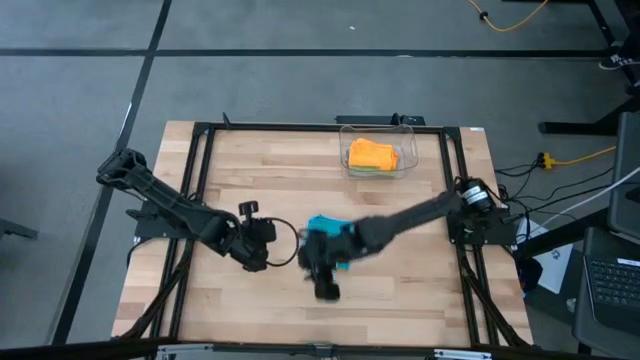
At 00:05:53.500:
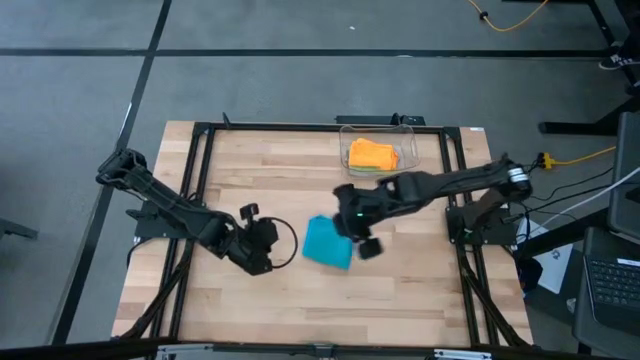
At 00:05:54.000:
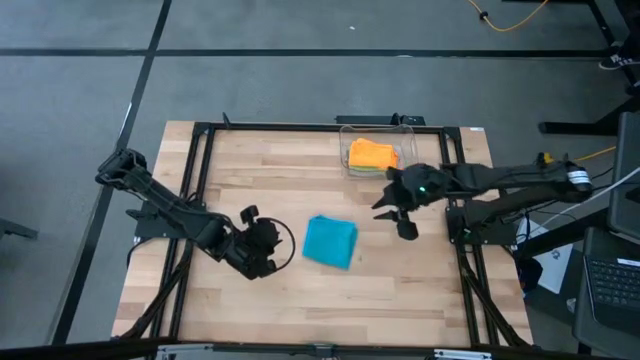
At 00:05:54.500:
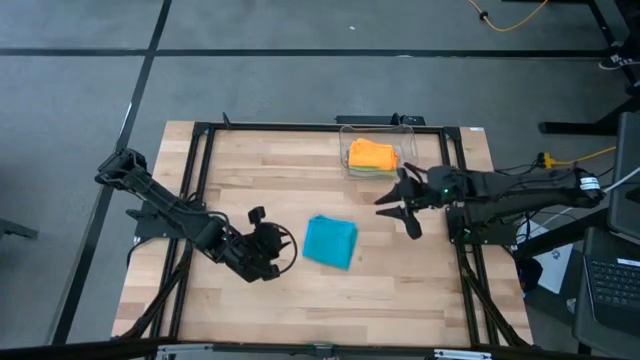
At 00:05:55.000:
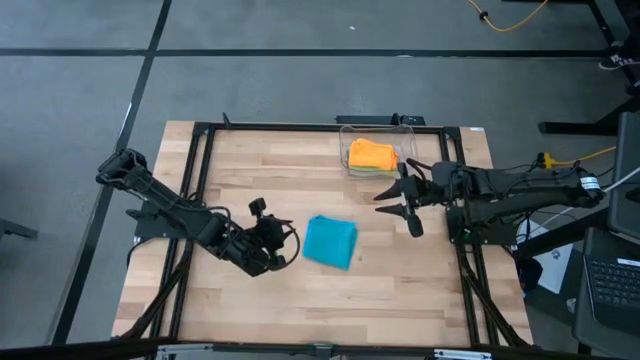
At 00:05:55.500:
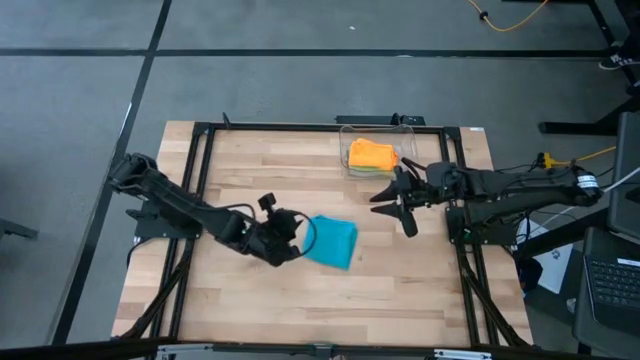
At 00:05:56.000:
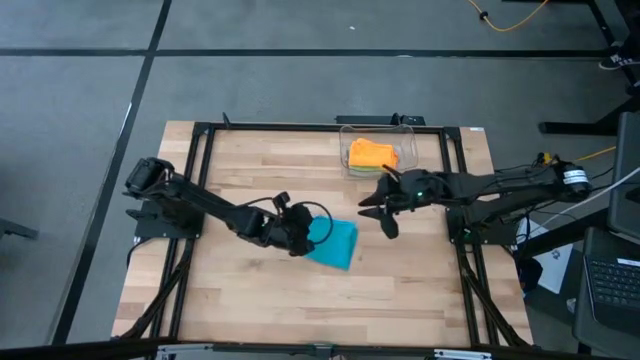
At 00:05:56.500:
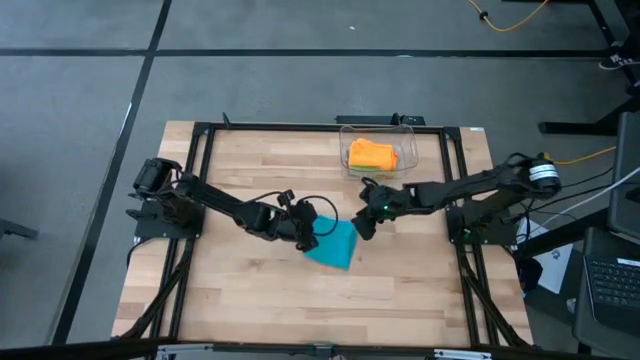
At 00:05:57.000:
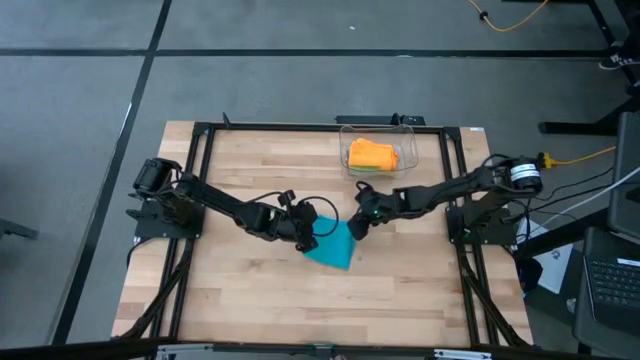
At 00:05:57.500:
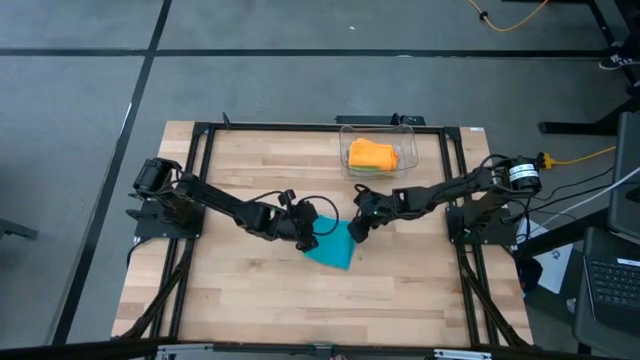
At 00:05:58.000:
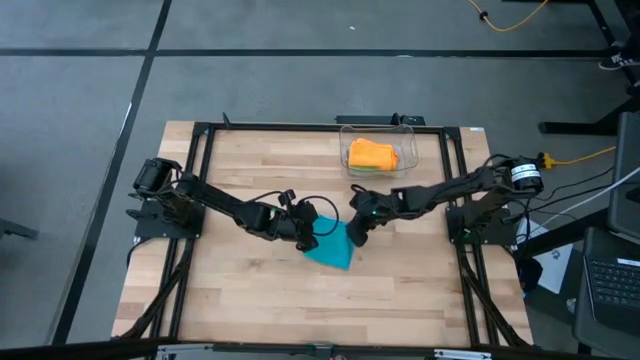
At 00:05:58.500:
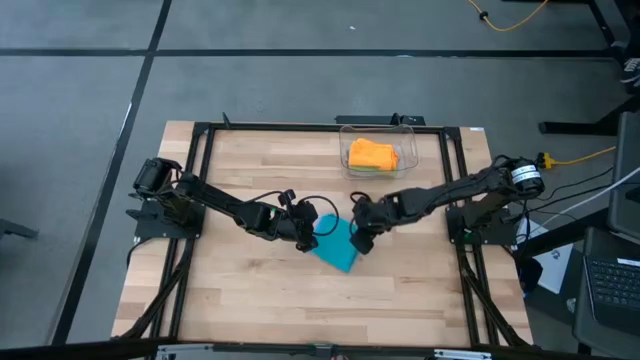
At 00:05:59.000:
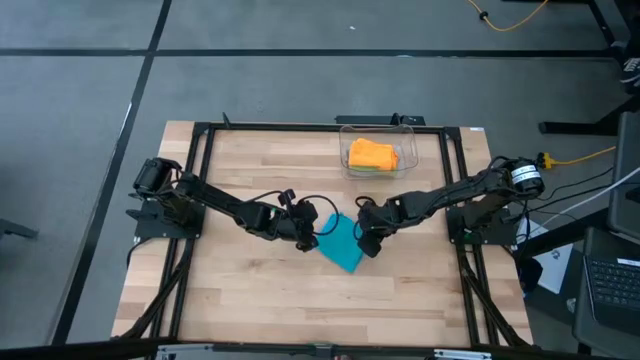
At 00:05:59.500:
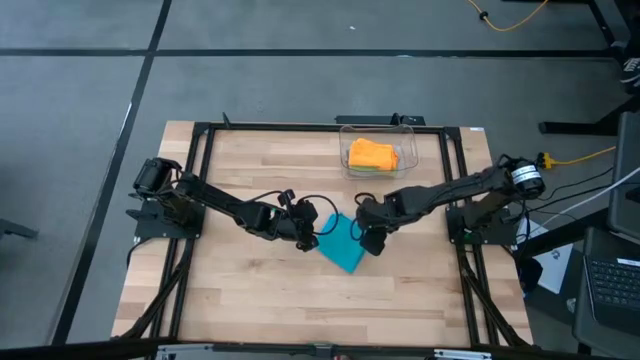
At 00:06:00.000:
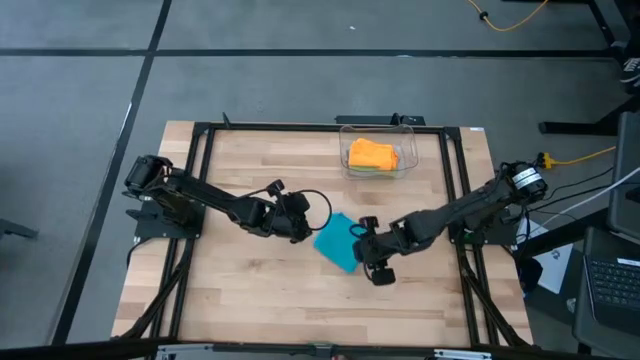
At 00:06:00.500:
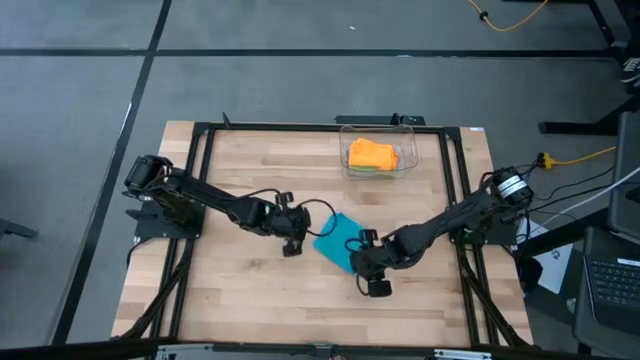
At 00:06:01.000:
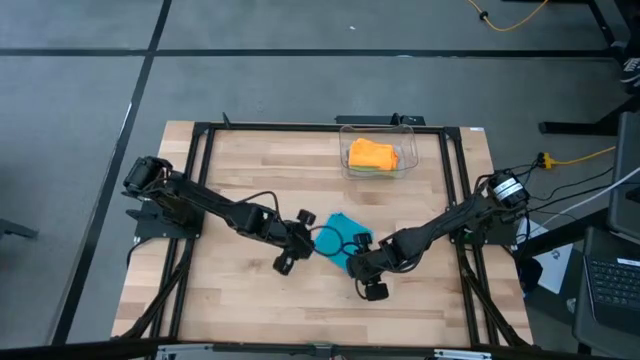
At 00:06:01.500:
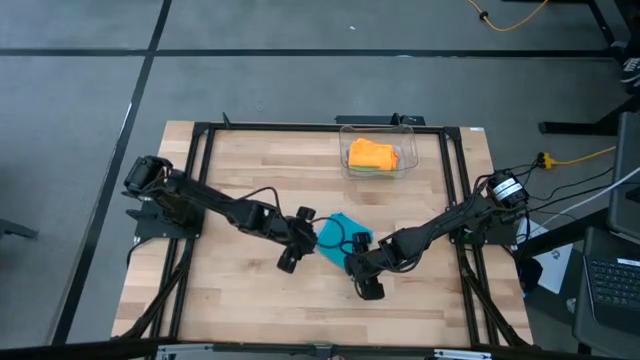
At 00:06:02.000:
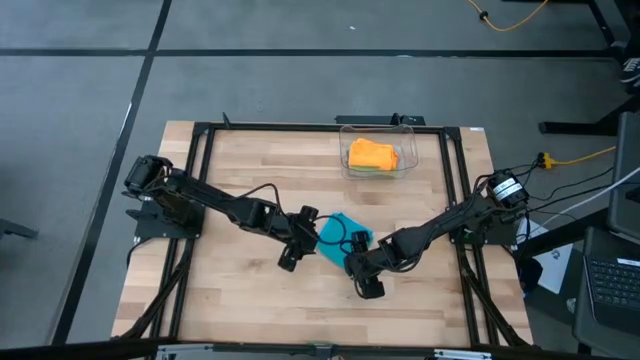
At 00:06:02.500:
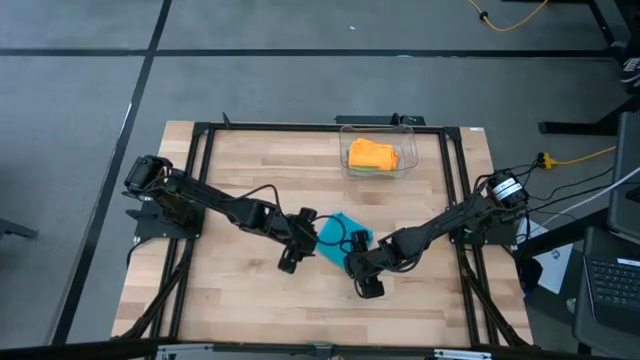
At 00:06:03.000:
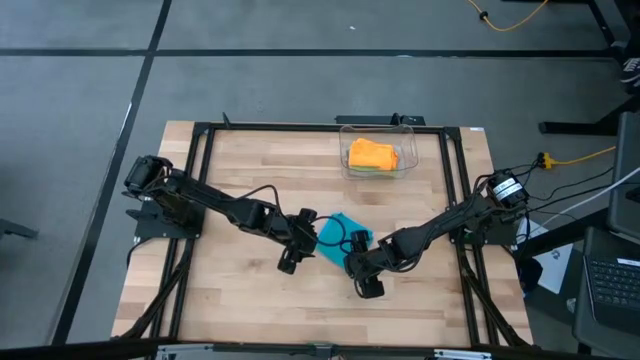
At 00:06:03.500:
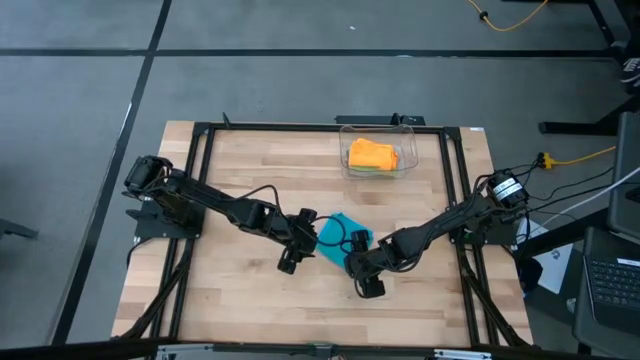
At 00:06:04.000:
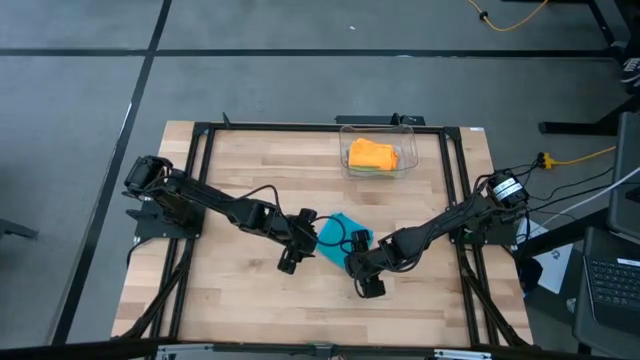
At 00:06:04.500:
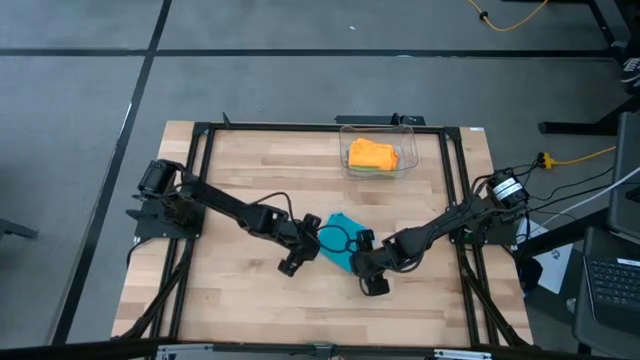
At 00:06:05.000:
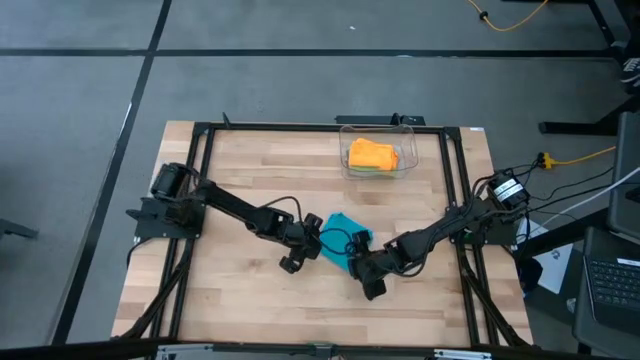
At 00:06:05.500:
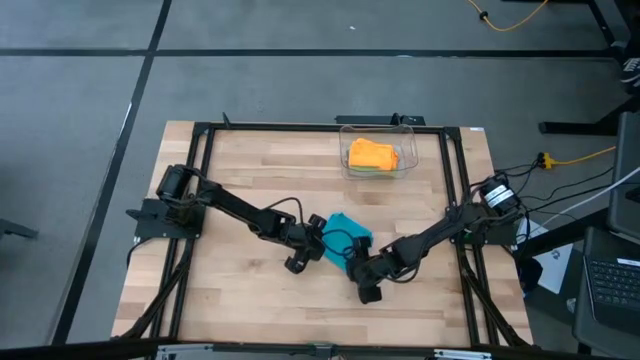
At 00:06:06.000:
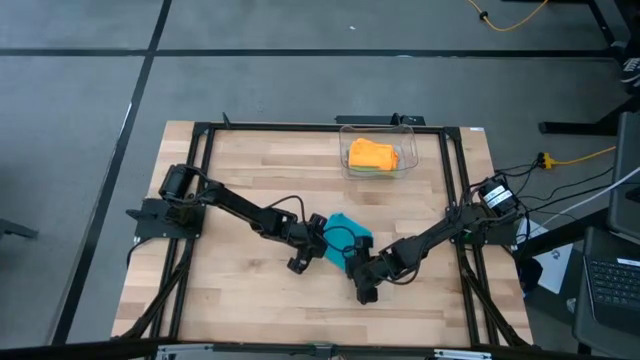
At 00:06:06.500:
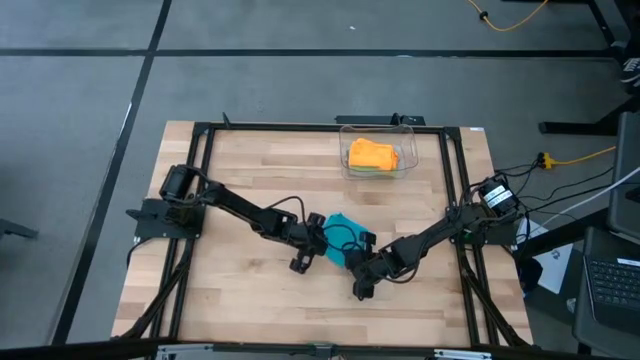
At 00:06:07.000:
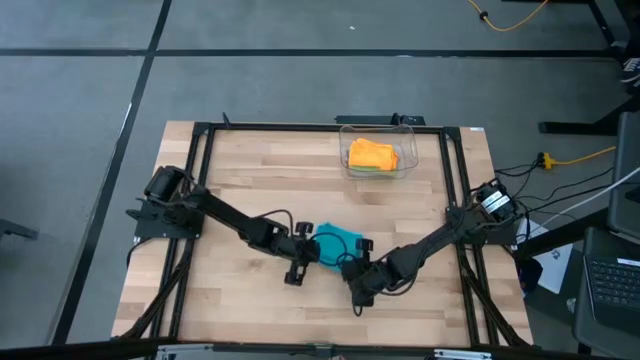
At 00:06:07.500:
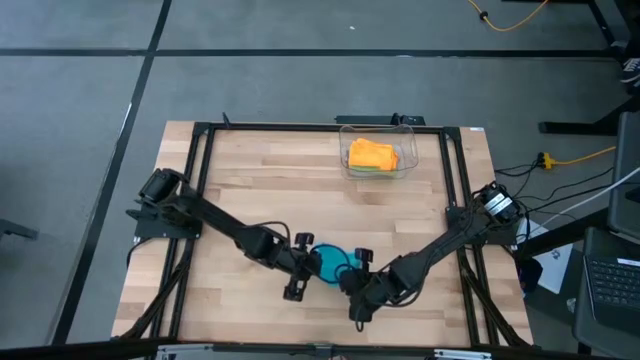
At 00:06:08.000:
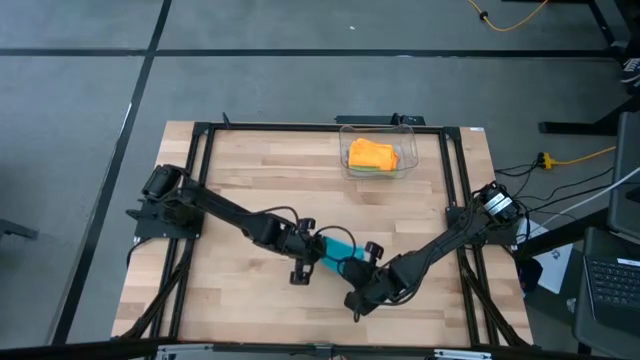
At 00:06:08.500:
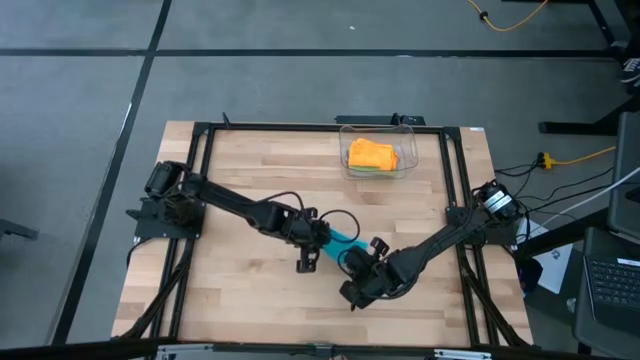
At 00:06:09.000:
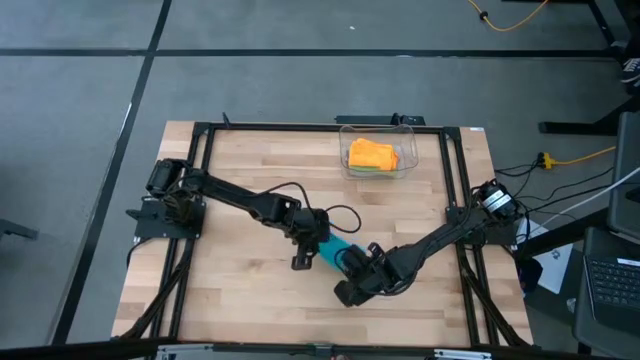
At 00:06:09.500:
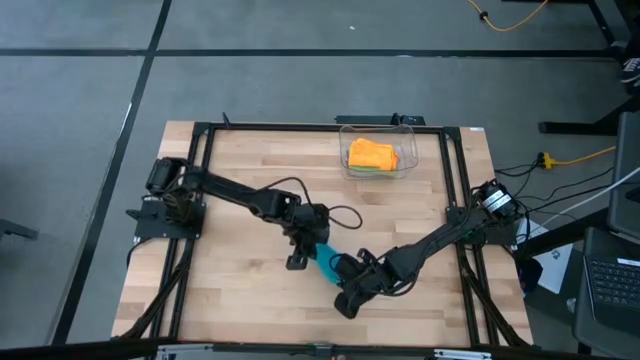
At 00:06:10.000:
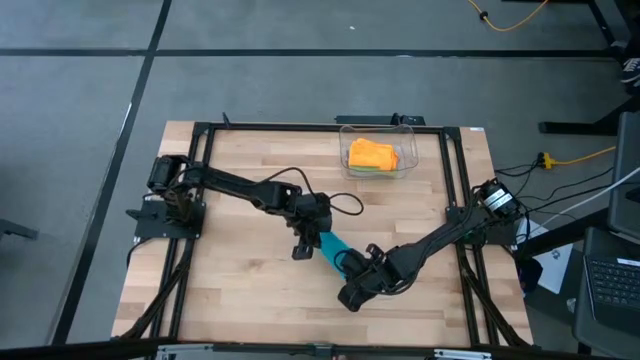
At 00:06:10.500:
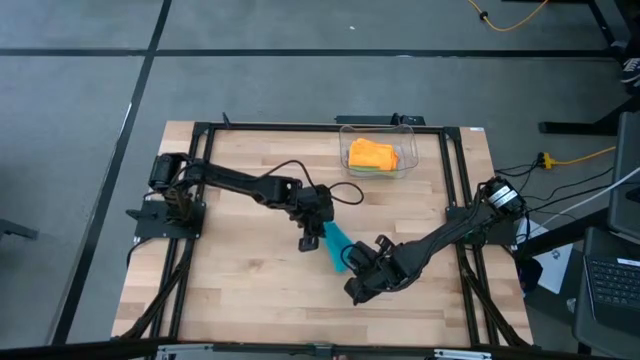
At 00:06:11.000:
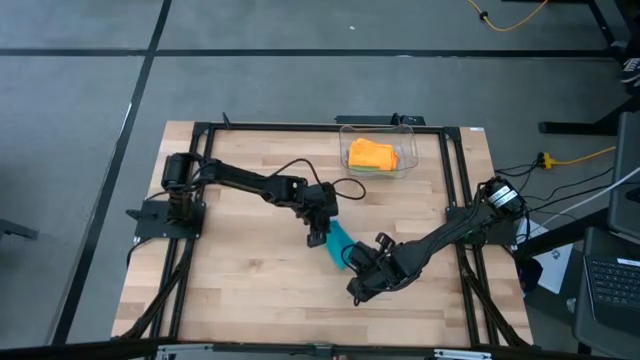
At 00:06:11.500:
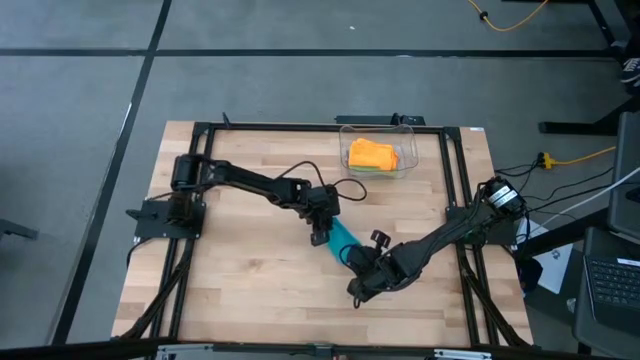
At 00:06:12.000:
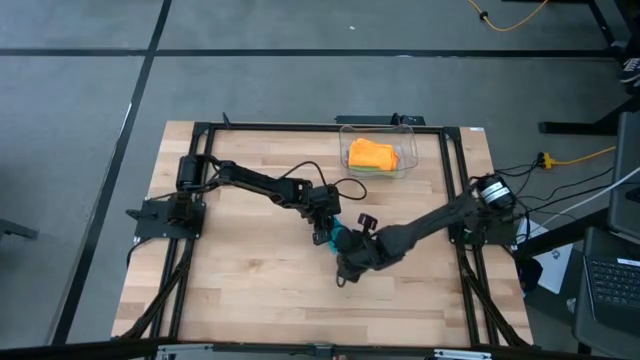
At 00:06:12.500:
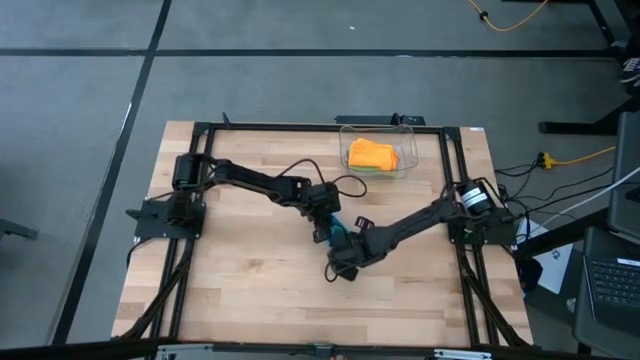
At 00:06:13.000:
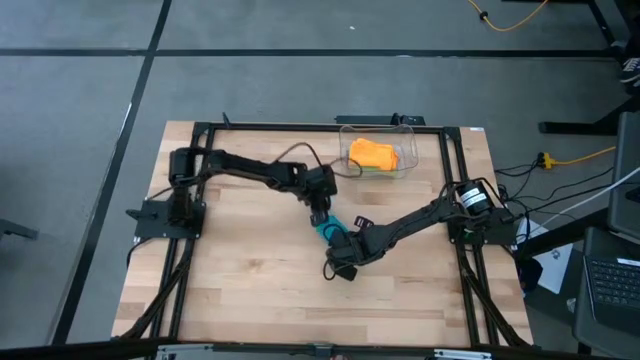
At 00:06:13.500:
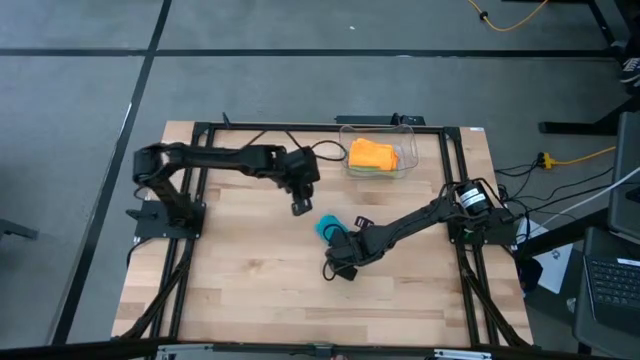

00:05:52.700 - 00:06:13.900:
Task: Fold microfiber towels
Fold the blue microfiber
